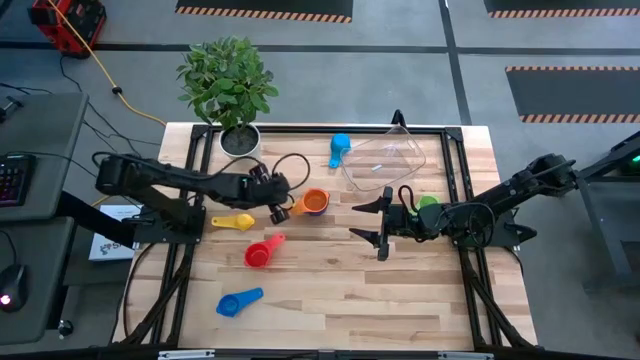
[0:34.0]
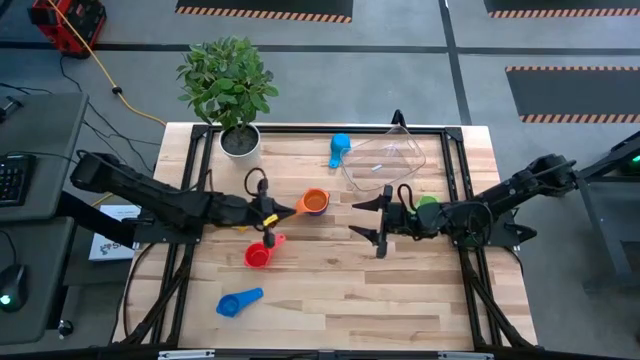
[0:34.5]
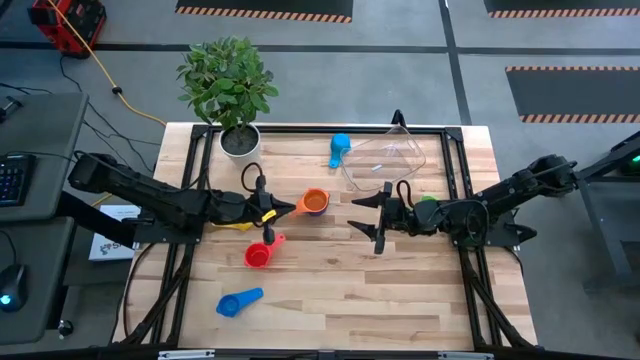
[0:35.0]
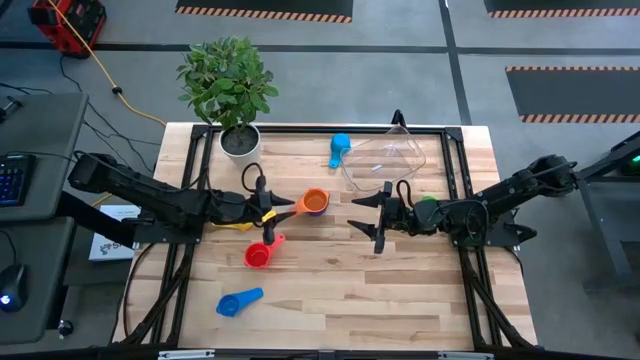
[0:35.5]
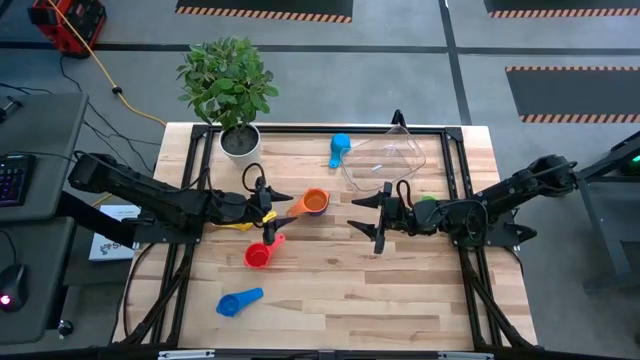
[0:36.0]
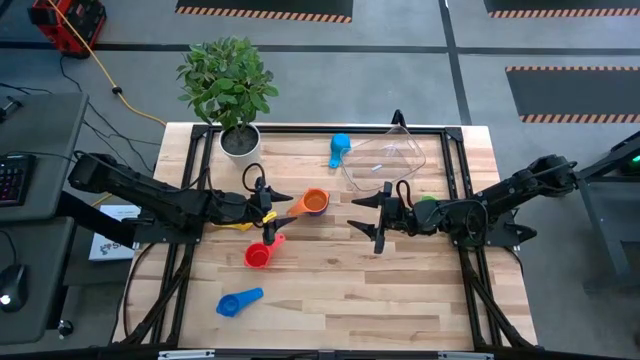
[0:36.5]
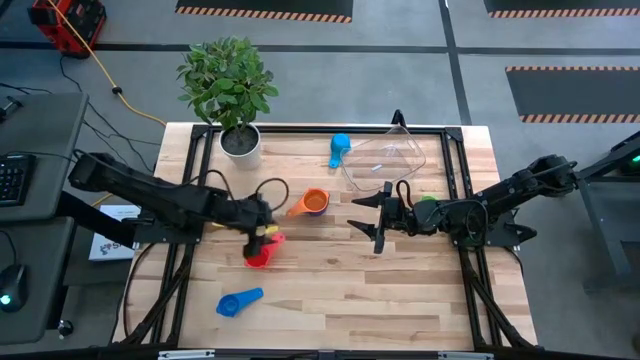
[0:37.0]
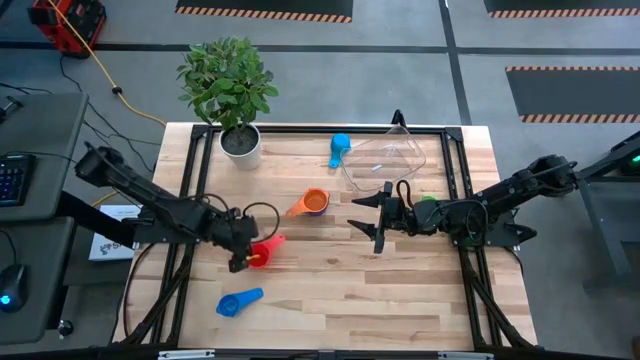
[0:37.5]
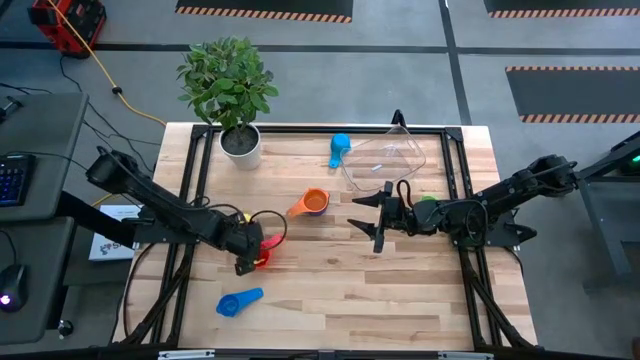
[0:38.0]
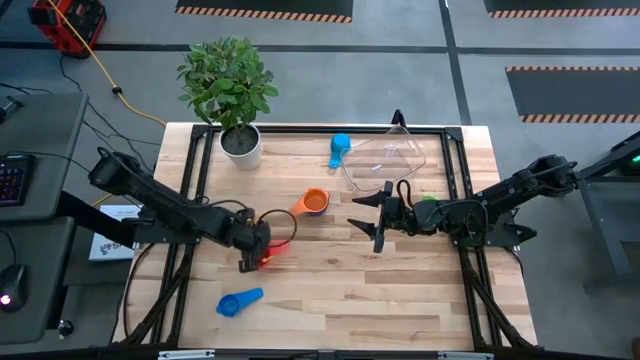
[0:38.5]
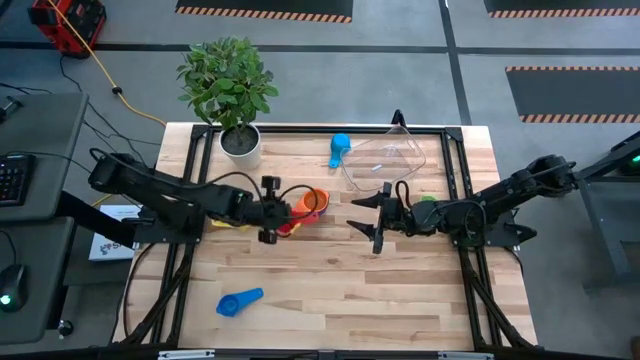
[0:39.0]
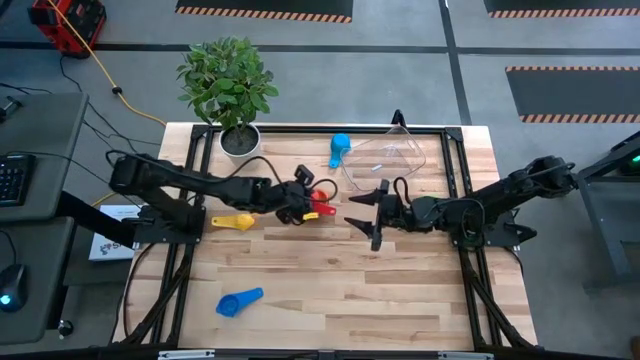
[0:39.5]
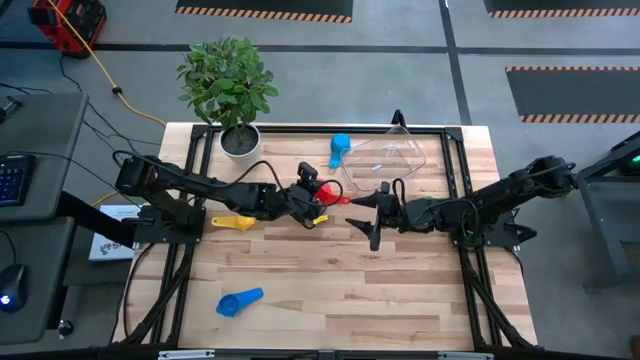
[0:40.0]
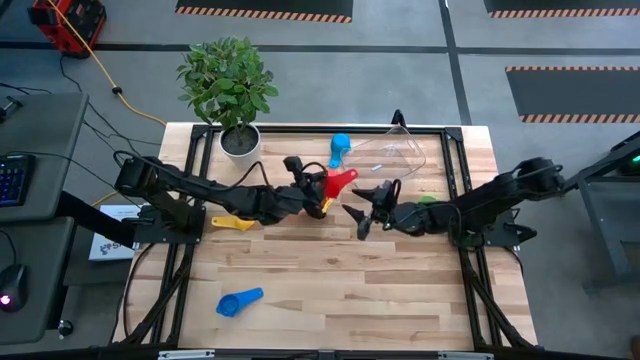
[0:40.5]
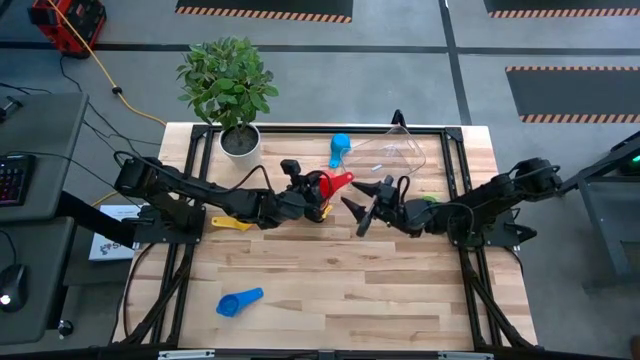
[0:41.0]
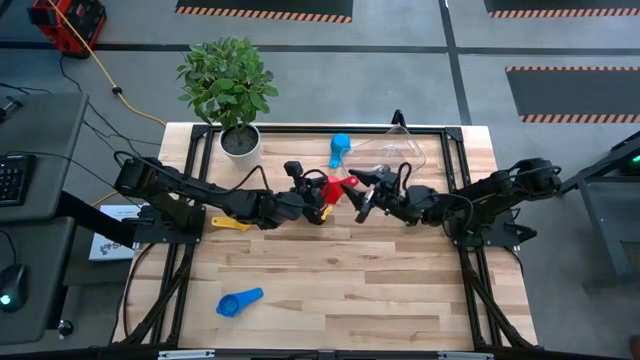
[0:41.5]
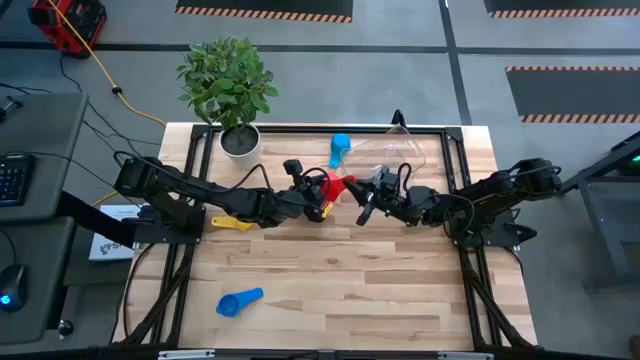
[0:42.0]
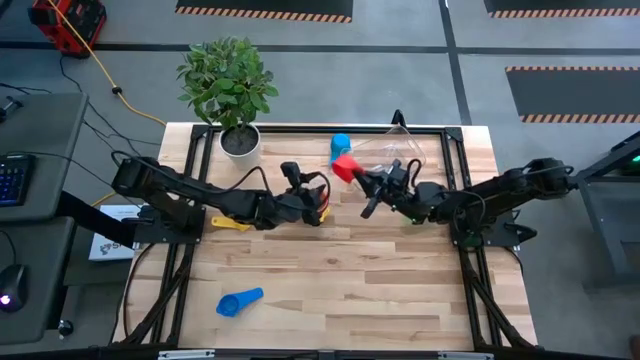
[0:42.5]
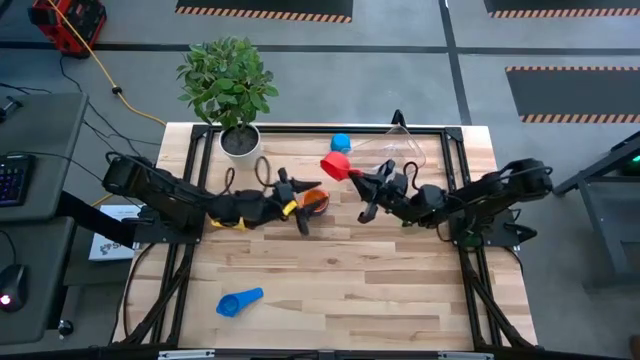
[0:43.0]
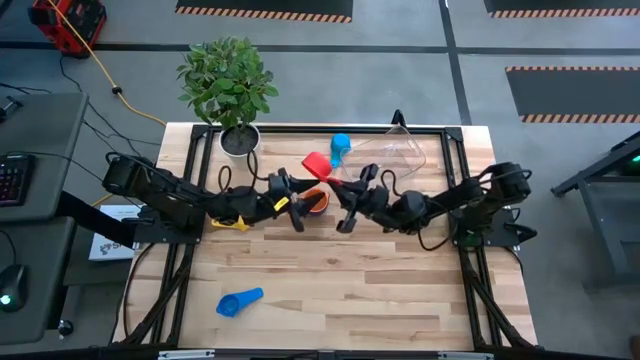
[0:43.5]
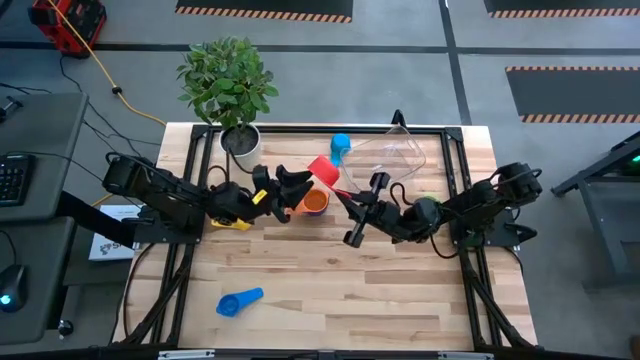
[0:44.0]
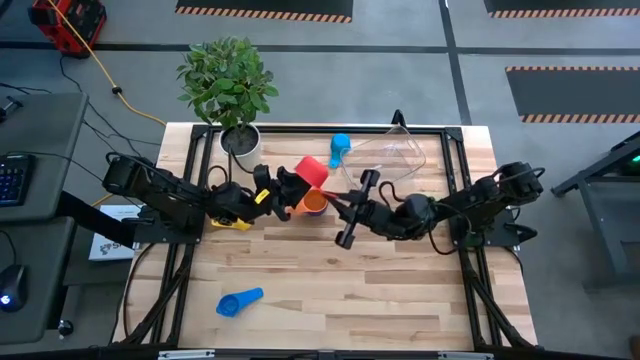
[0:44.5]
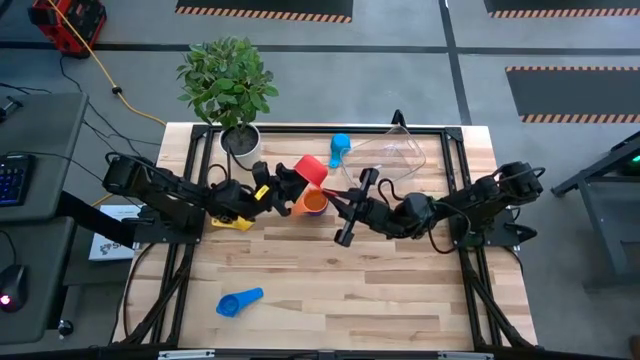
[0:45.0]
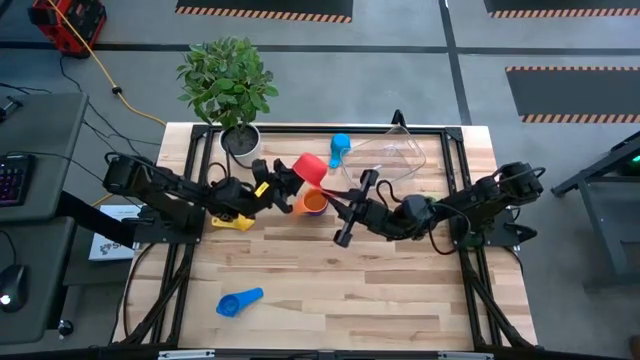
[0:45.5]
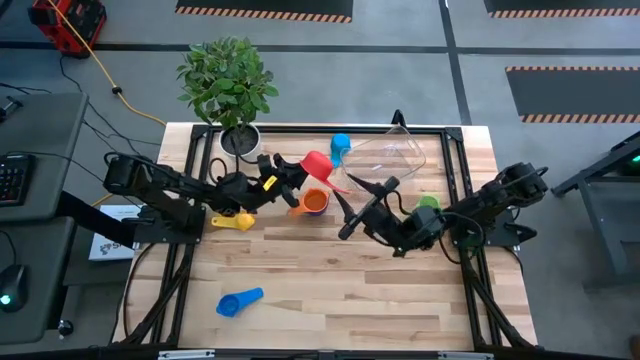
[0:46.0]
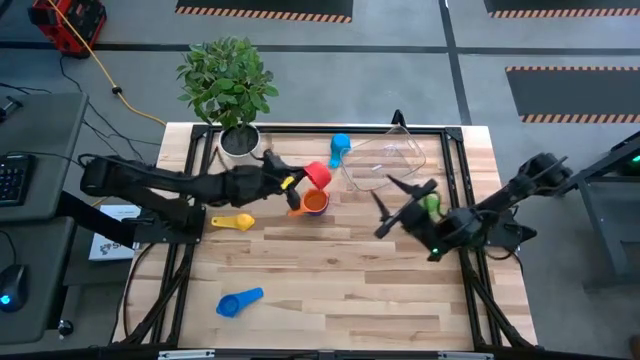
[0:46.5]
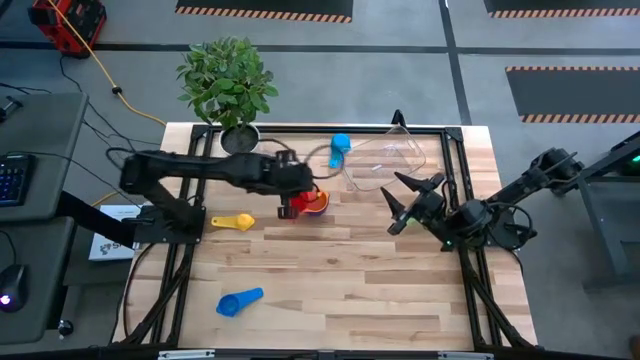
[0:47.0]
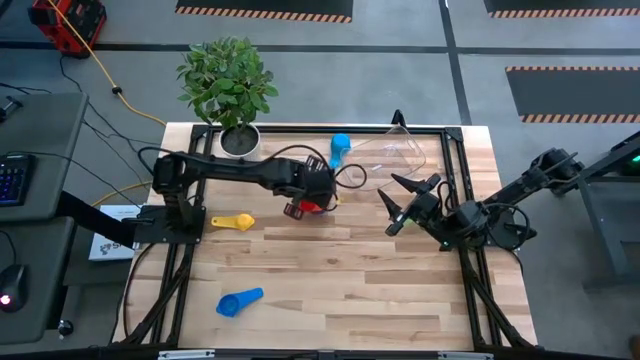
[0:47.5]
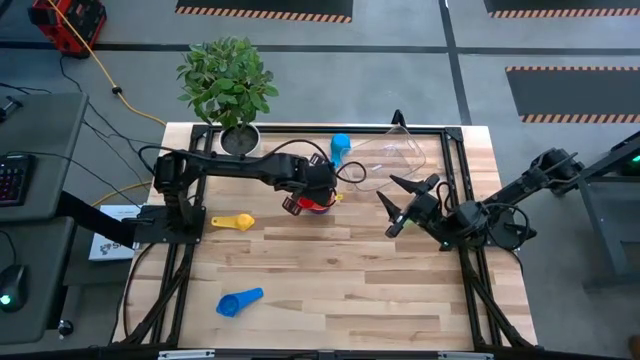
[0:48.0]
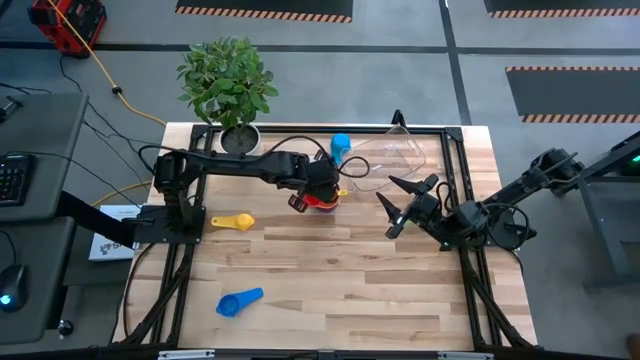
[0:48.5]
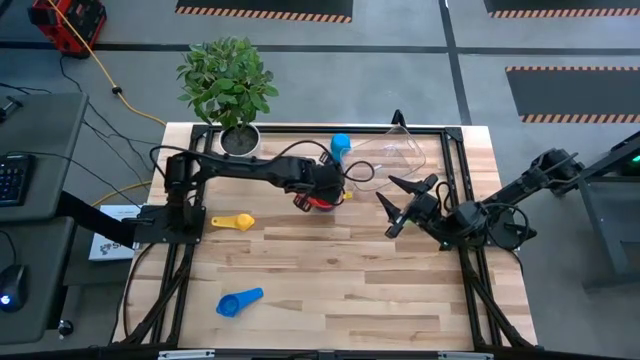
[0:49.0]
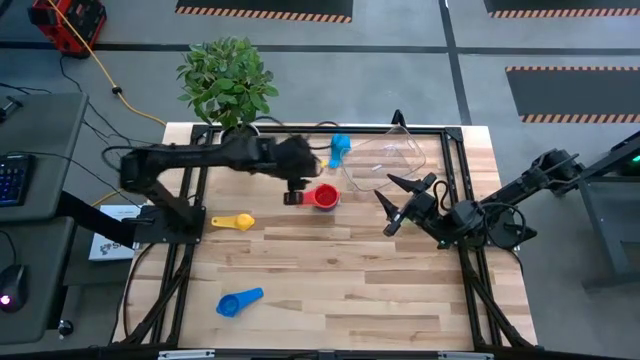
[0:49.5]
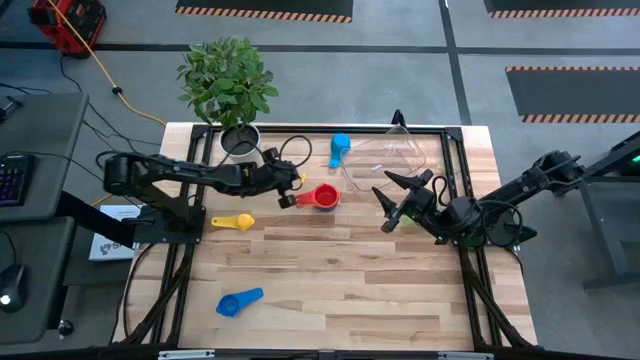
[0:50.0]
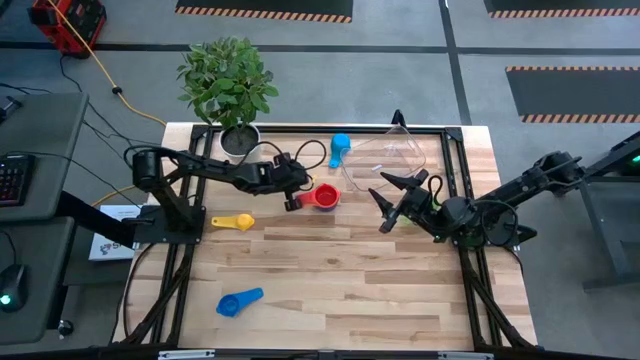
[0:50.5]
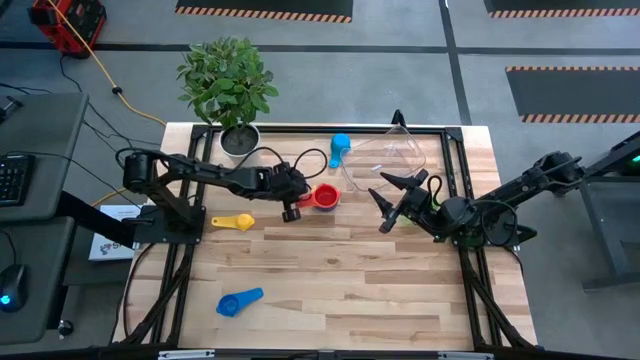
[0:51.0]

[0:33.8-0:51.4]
Task: Nest measuring cups in basket
Stack the red measuring cup on top of the orange measuring cup

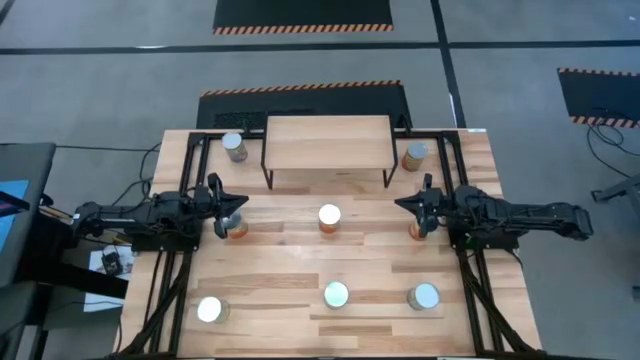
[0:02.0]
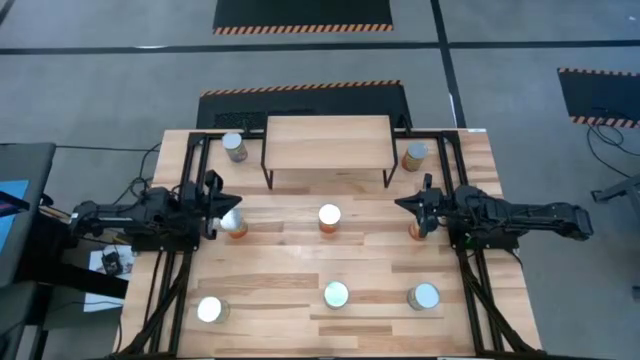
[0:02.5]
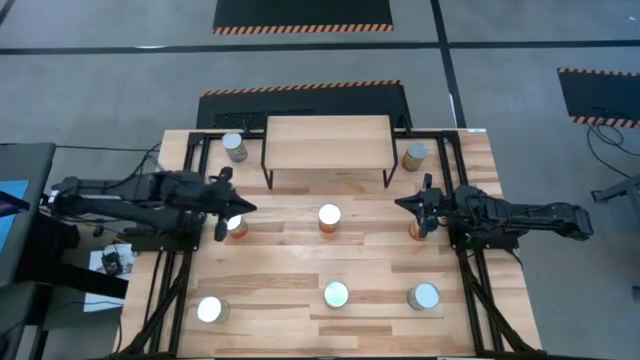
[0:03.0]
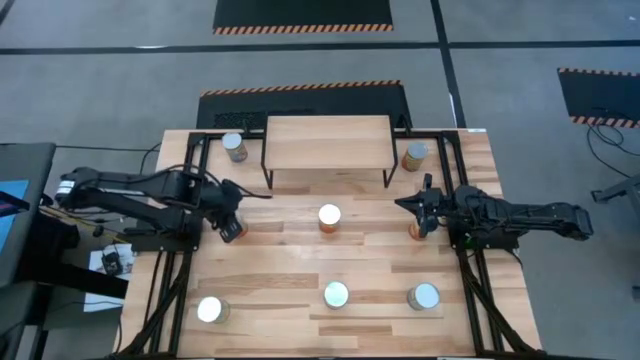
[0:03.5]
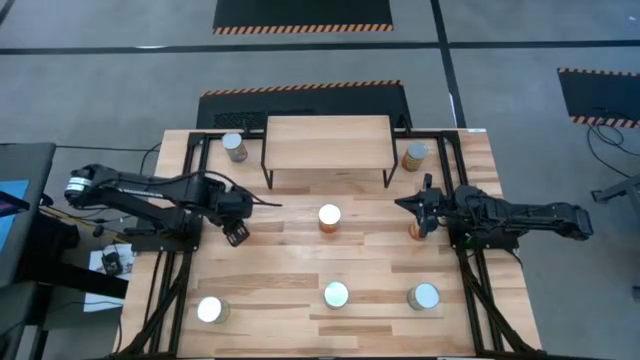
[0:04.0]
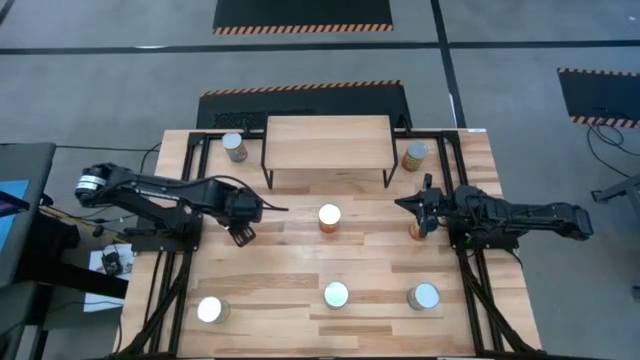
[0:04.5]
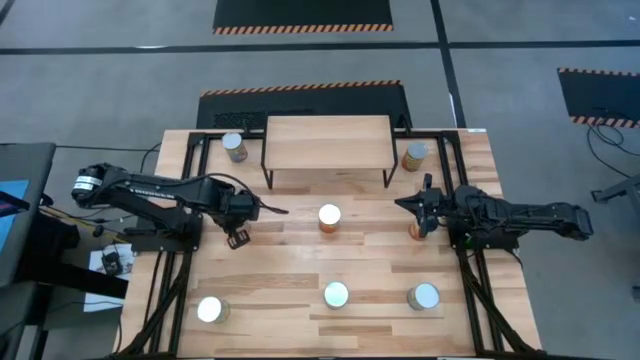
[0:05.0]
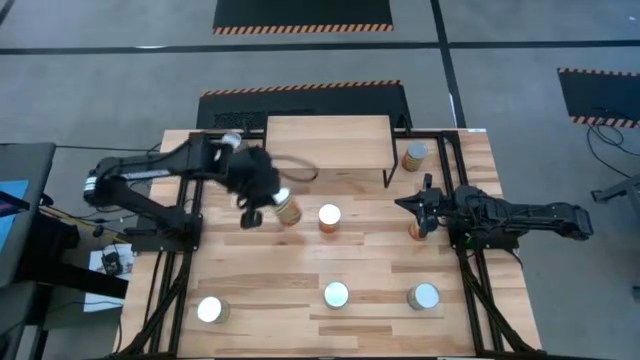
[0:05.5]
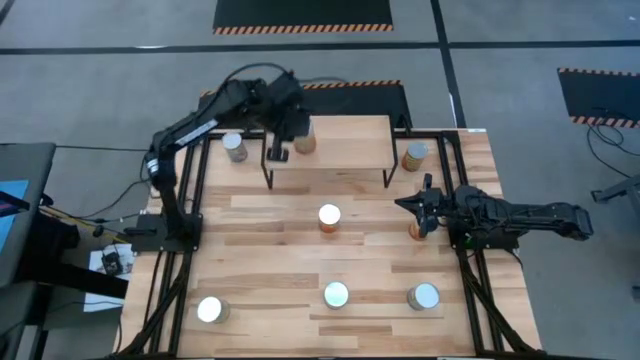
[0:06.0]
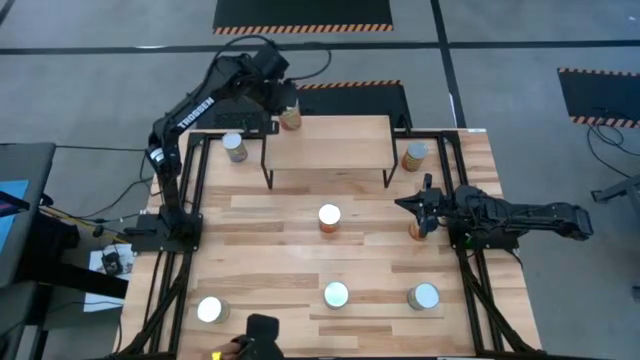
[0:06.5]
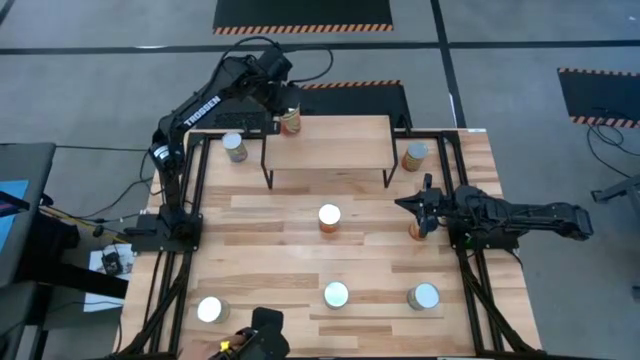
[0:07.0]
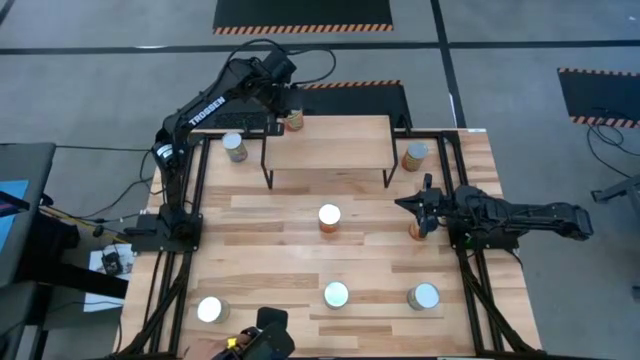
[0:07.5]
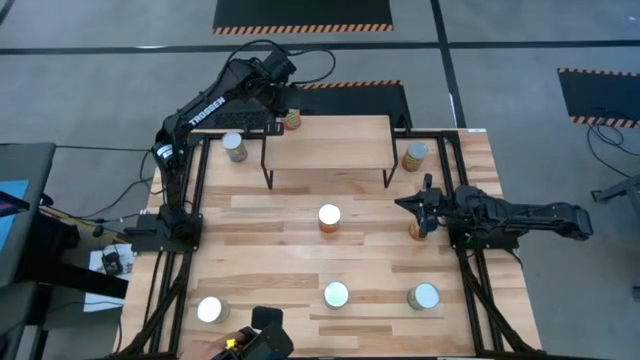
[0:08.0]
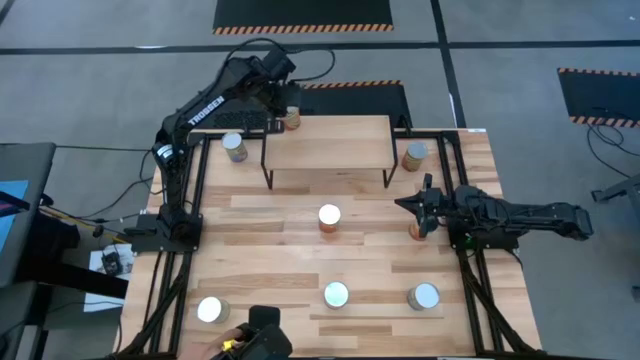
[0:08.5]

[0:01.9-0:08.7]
Task: Pick and place cans onto a shelf
Put the bottom canned green beans on the shelf
